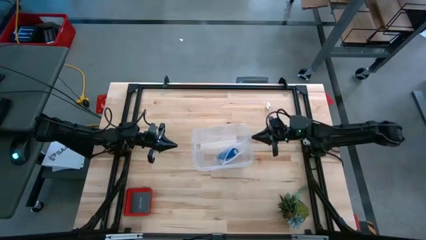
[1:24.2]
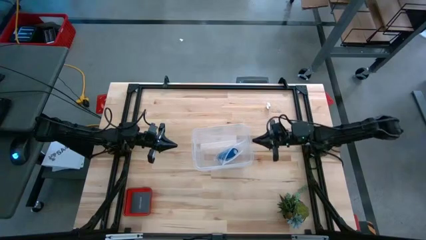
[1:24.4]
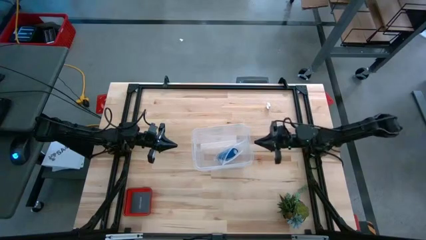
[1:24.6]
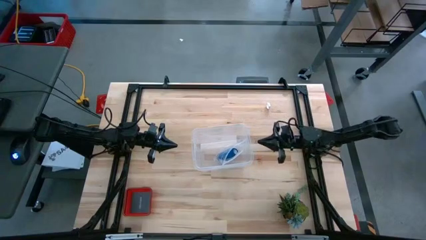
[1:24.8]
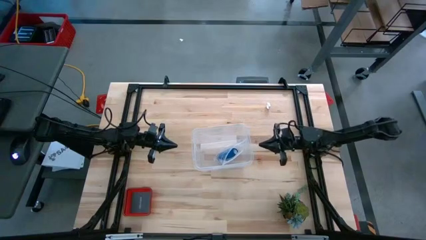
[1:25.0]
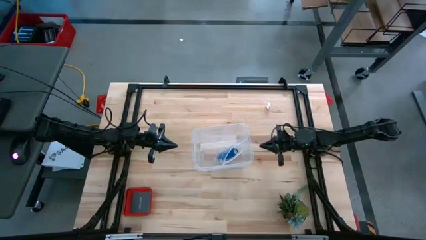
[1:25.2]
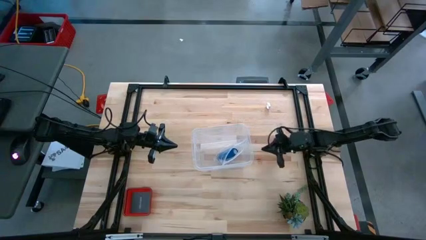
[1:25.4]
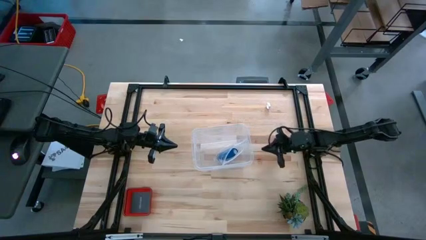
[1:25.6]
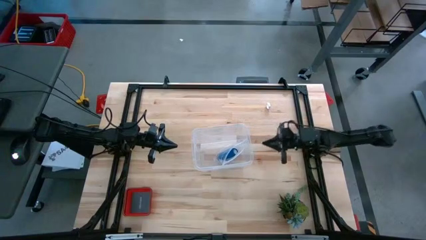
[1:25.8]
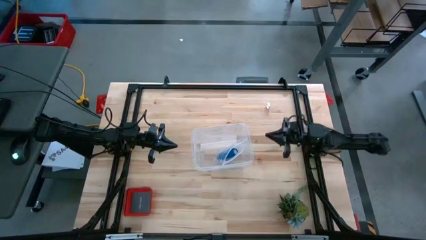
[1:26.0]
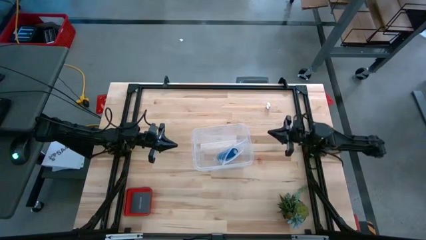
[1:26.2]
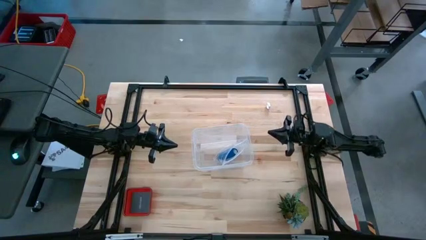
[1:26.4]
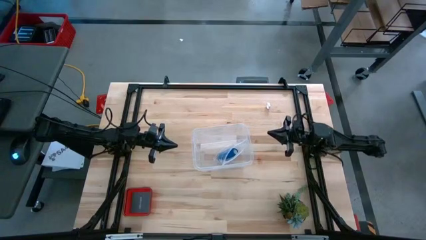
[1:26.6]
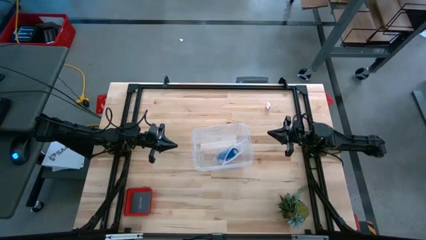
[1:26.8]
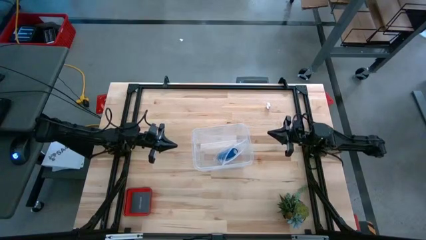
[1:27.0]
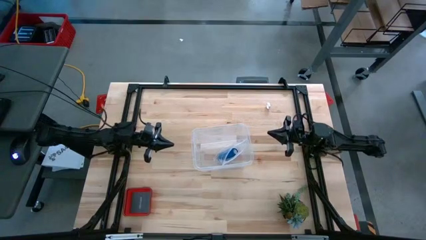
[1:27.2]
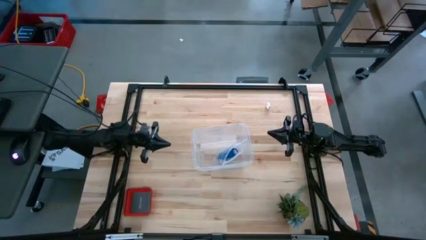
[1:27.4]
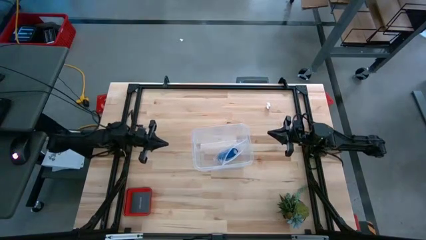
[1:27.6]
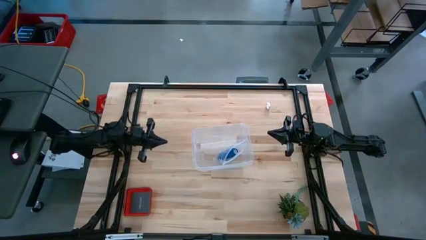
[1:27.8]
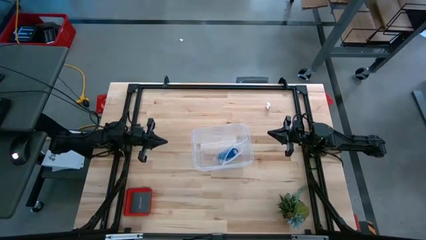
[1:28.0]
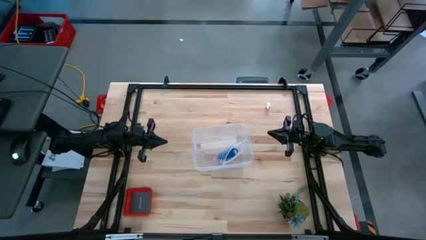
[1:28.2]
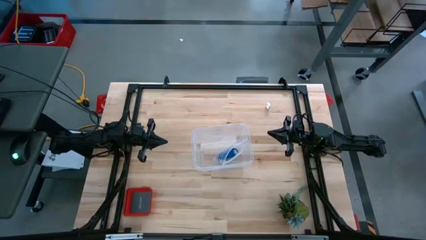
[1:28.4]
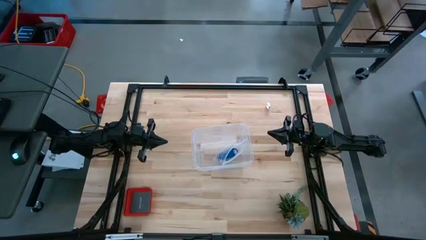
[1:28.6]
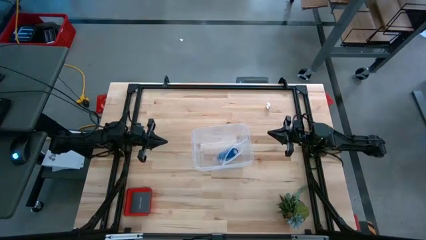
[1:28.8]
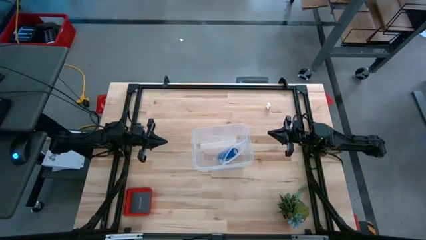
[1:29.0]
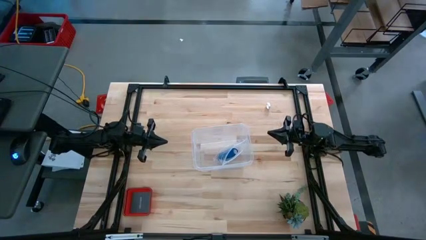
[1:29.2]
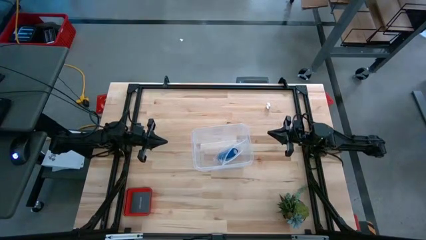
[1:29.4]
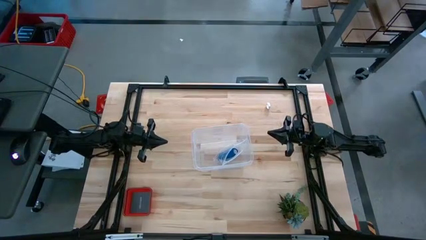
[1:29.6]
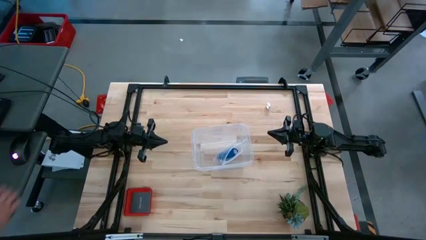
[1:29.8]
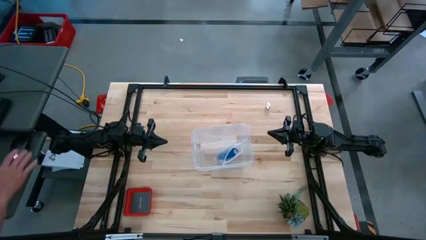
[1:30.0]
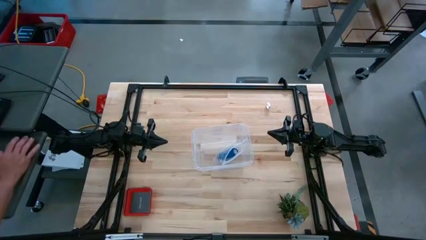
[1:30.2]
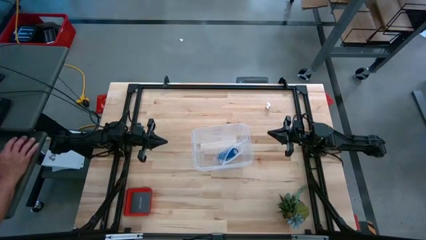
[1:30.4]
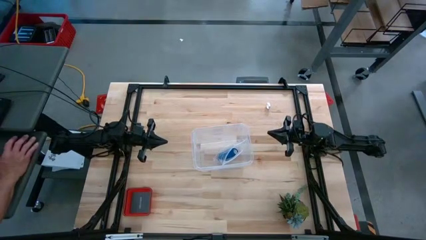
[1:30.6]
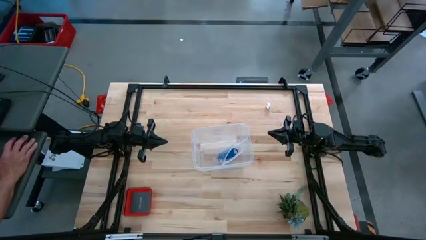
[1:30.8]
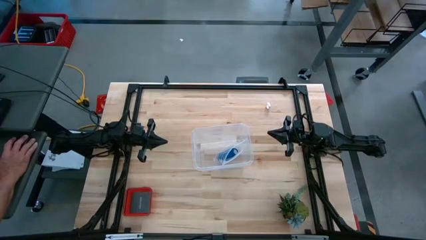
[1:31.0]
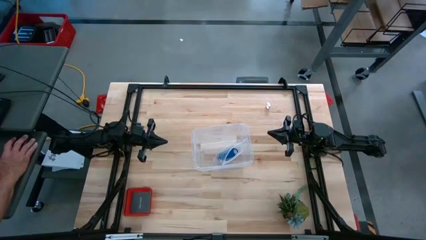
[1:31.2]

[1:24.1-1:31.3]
Task: Roll bandage
Return to Home Position

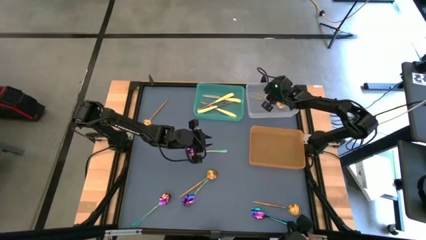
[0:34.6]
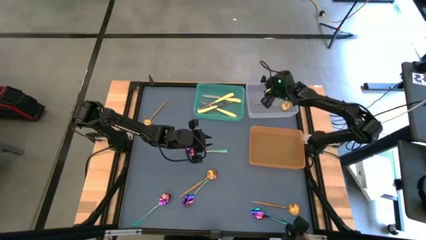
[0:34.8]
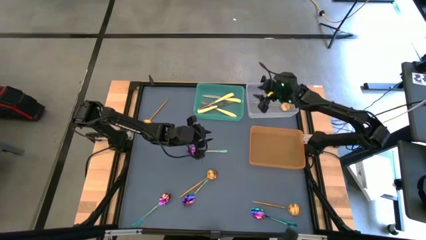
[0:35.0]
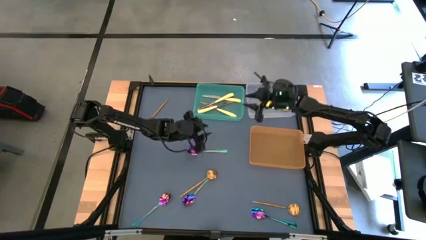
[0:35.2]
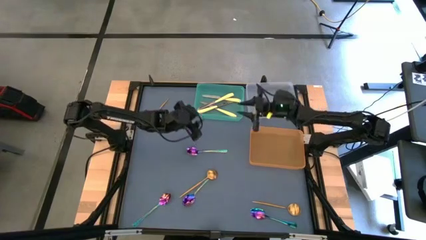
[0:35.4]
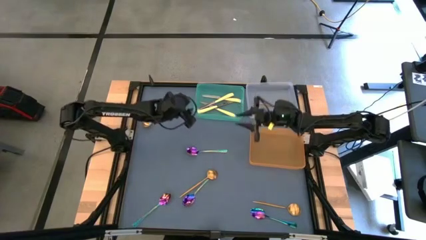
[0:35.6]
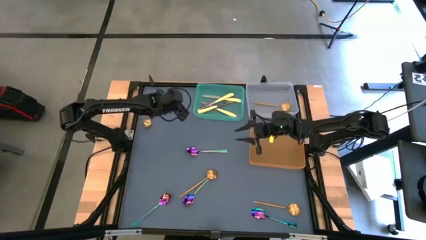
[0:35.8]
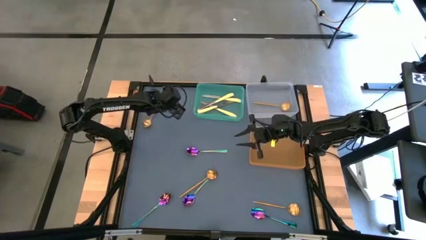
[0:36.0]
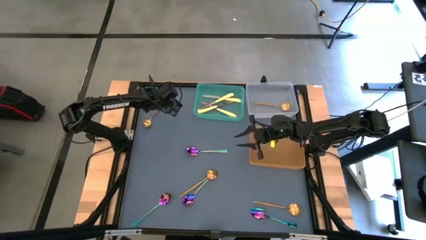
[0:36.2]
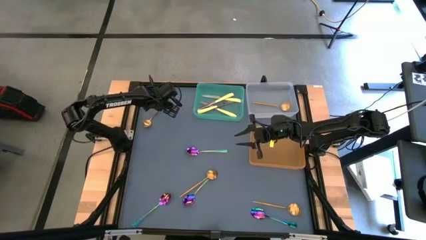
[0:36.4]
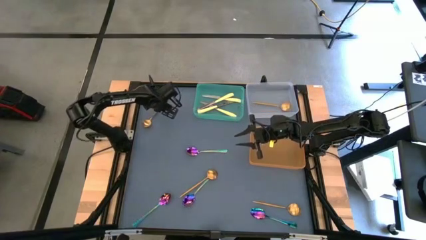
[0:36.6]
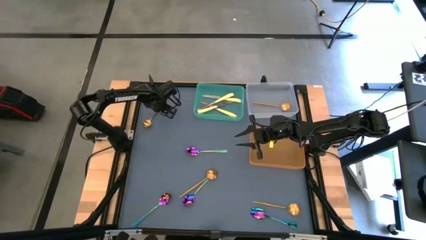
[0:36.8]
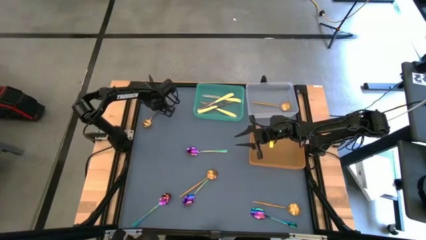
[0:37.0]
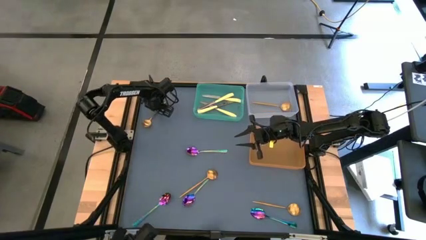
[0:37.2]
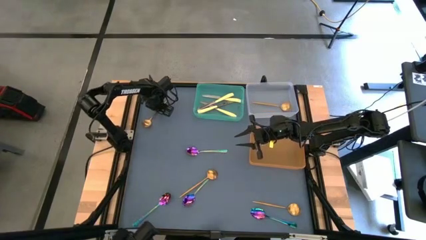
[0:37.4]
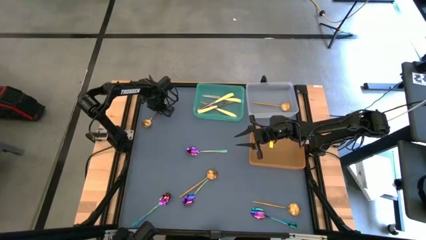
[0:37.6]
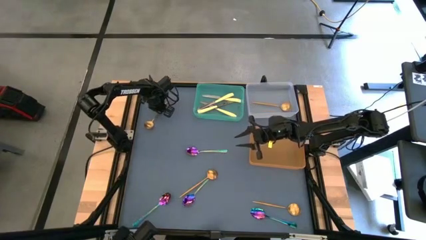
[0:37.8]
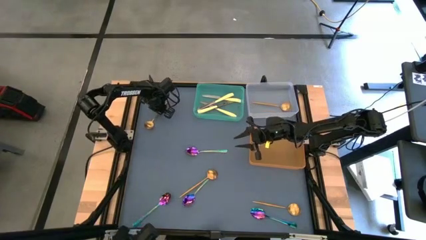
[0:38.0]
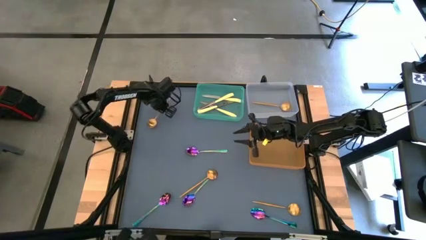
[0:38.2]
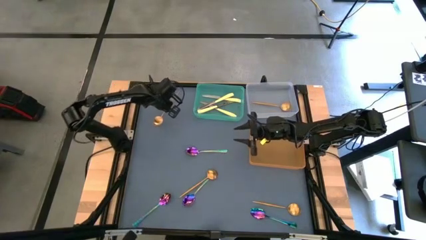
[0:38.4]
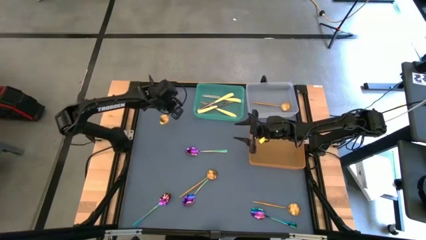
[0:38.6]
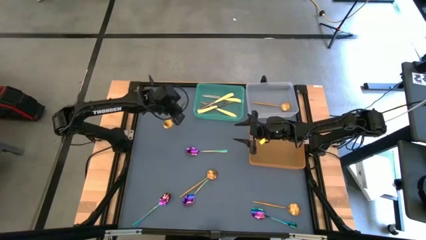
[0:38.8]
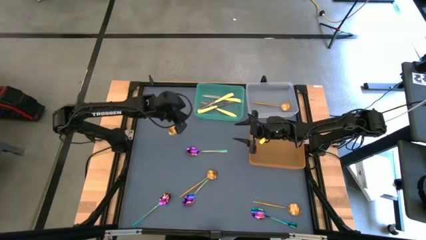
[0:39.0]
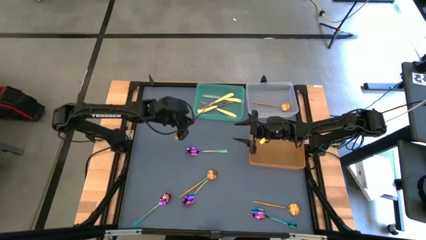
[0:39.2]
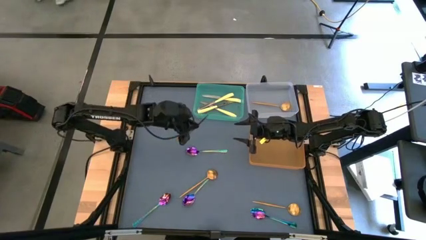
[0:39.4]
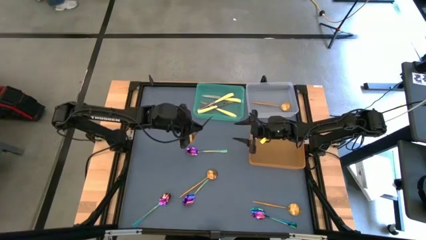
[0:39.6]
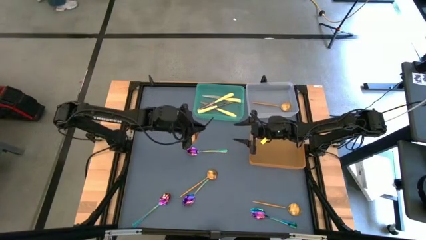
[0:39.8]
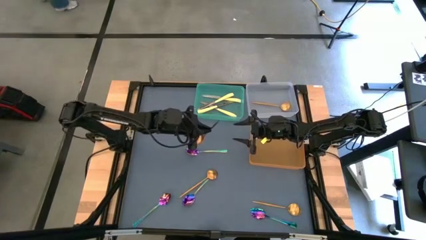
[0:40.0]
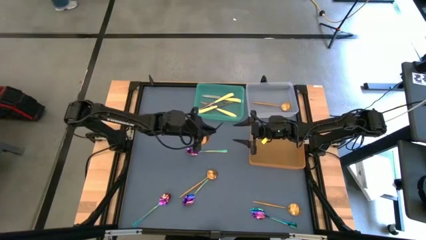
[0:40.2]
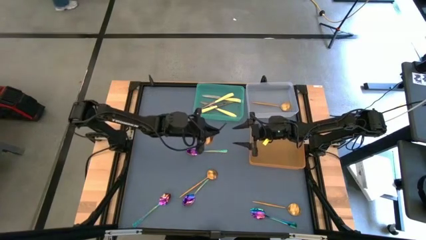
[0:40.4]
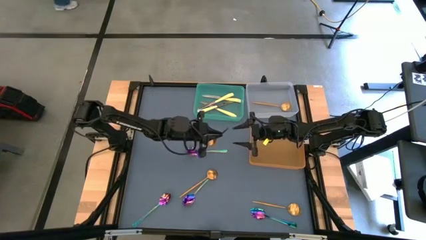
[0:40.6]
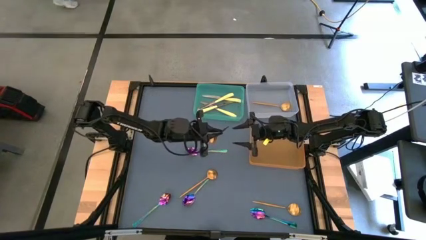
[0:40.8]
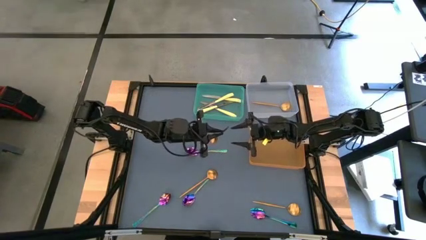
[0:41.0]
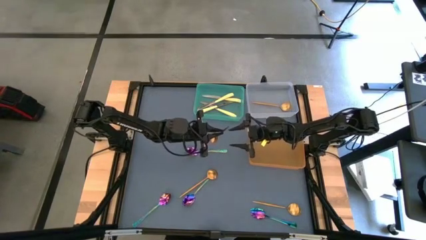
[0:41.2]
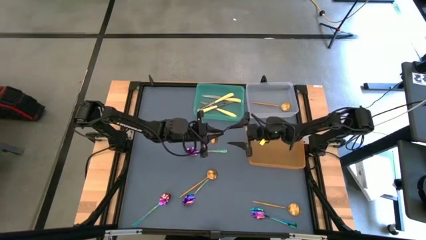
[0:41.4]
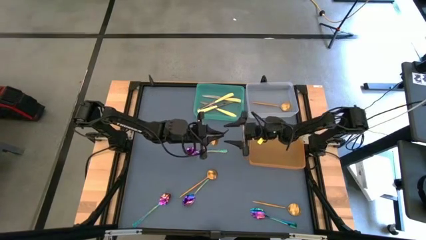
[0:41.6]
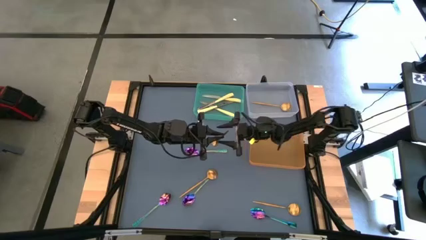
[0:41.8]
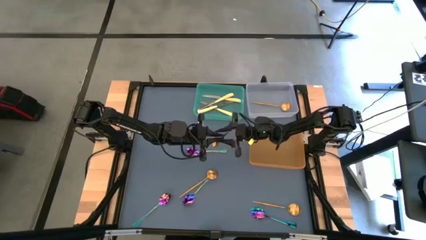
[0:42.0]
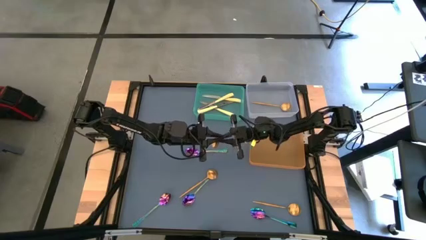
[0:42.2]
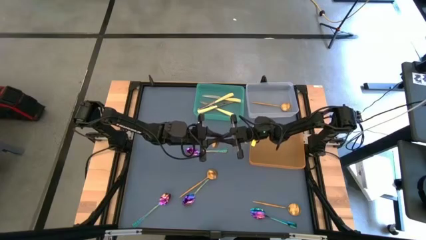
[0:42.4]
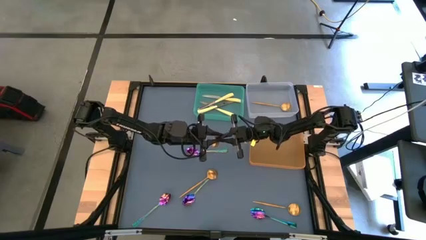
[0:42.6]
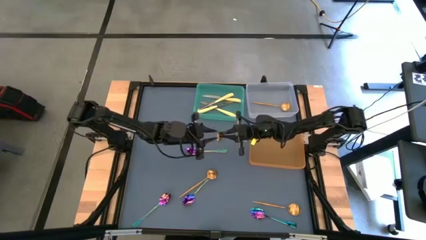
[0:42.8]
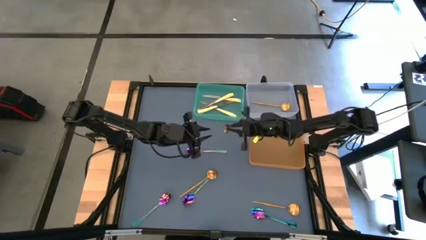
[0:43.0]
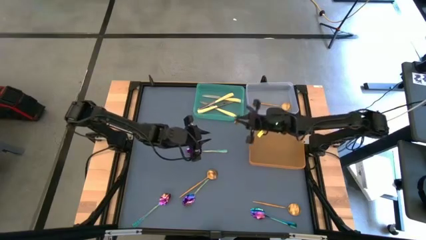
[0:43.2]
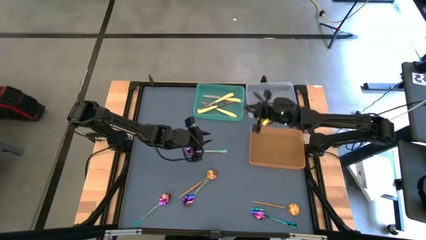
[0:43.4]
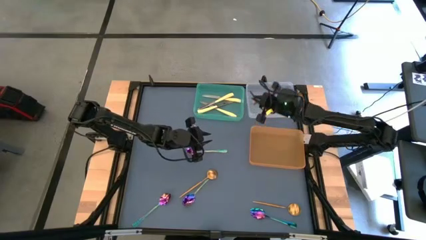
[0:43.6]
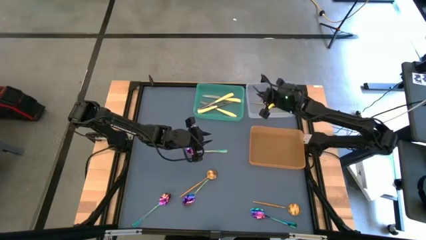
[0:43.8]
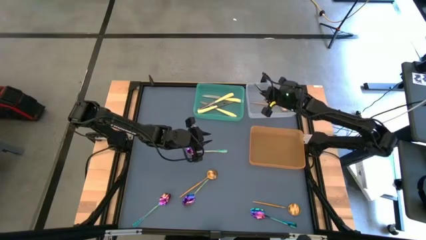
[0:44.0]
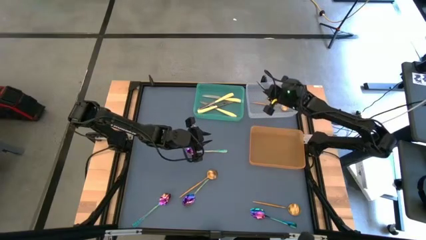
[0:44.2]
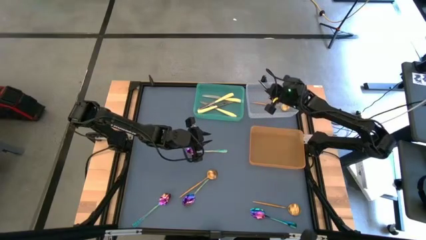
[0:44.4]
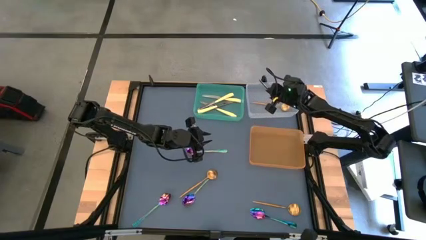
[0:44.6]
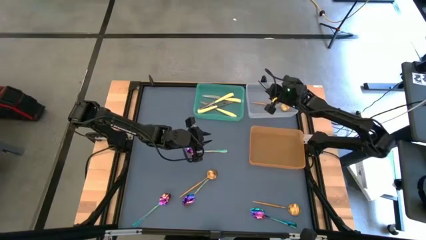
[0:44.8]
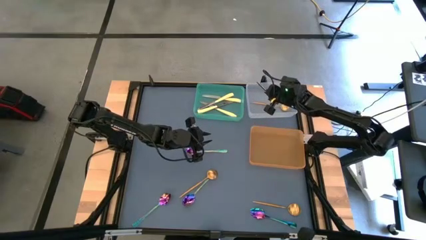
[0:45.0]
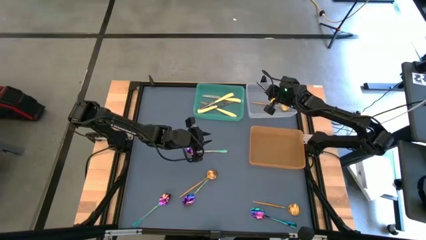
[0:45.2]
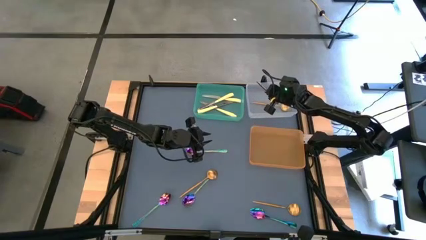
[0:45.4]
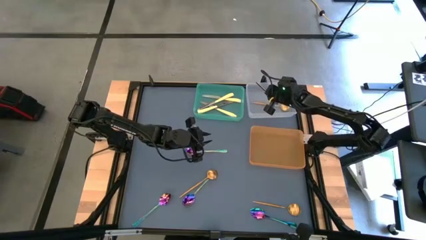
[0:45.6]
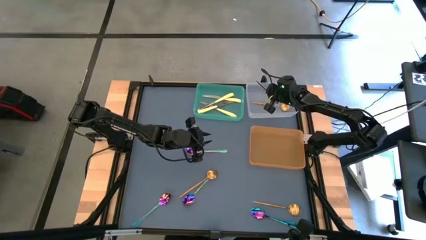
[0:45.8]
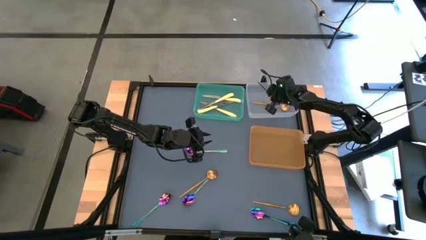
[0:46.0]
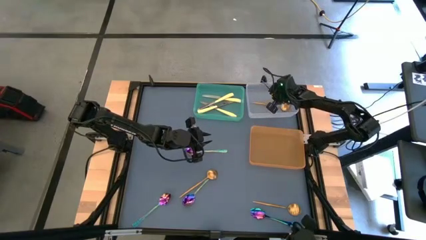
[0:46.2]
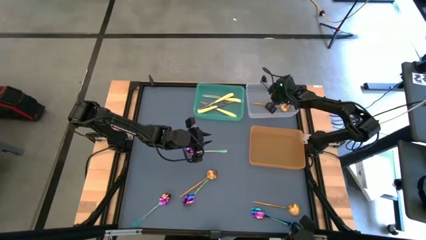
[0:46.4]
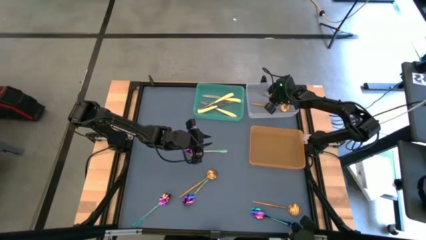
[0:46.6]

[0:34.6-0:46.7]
Task: Sort silverware by color (type)
Put the gold spoon into the transparent bin
